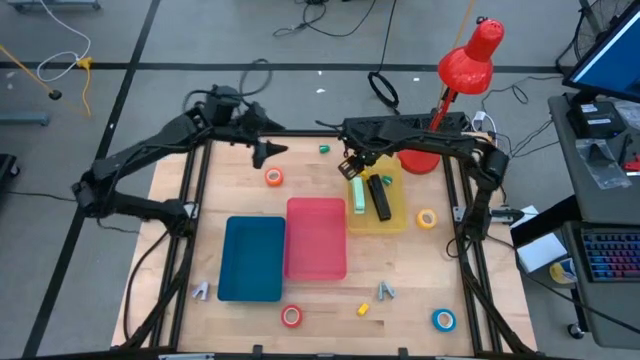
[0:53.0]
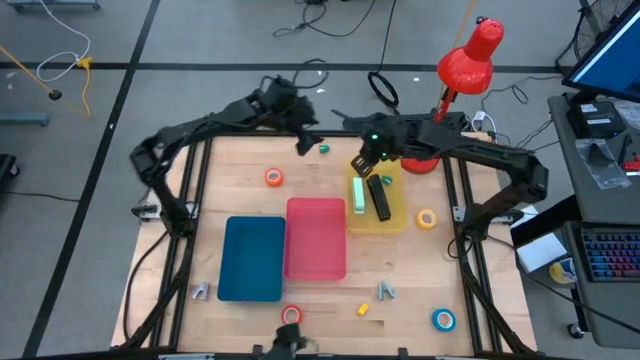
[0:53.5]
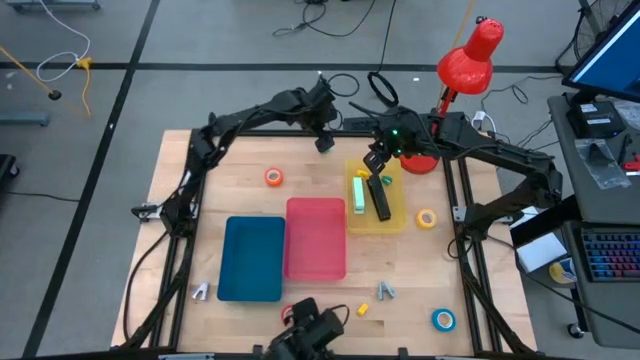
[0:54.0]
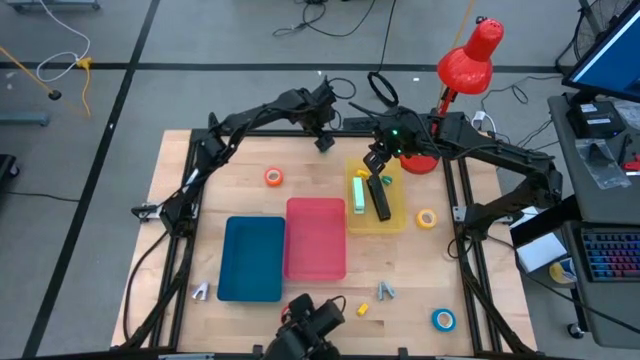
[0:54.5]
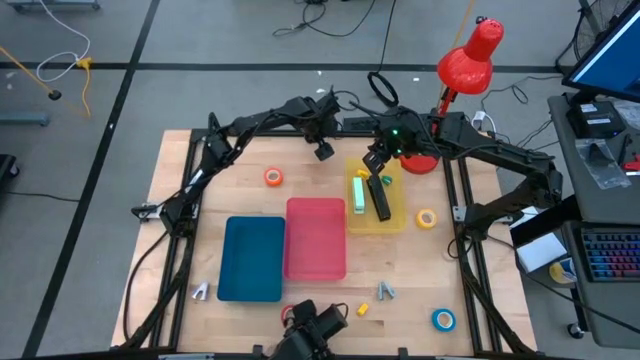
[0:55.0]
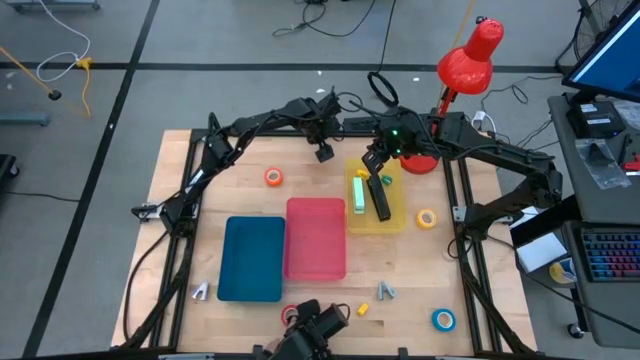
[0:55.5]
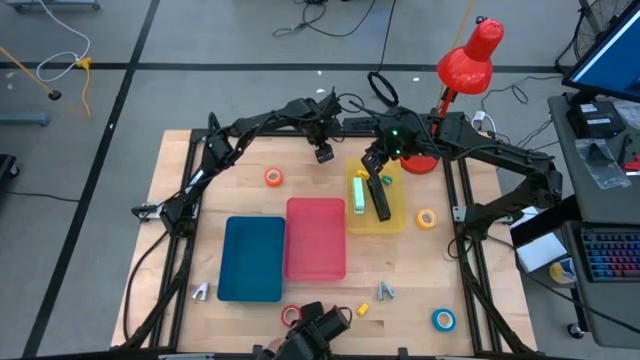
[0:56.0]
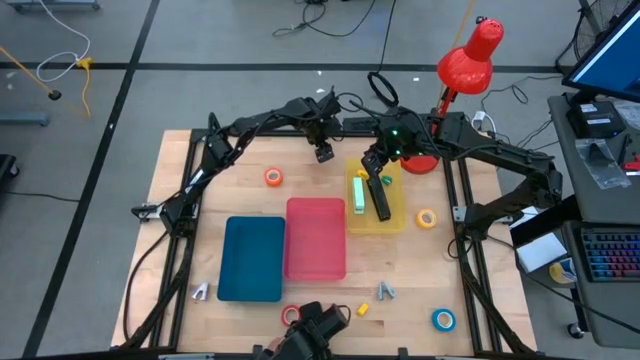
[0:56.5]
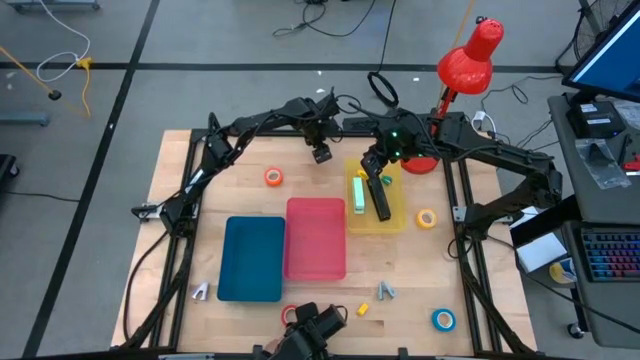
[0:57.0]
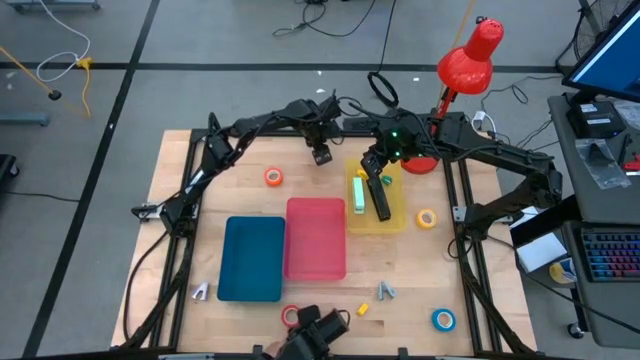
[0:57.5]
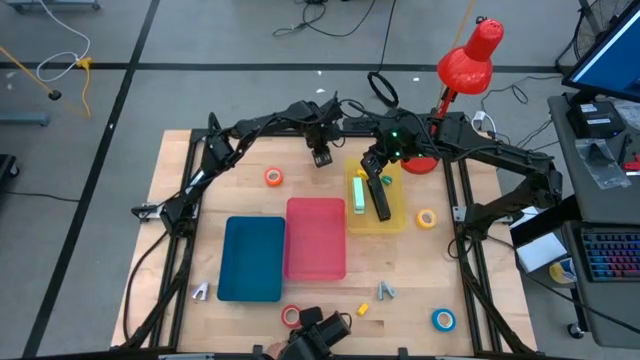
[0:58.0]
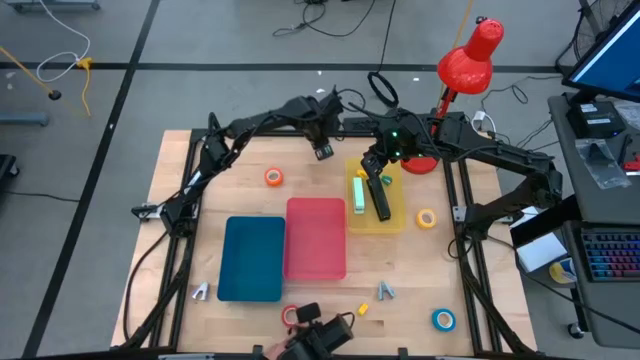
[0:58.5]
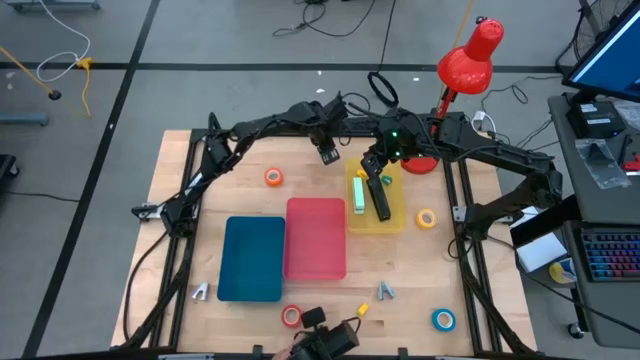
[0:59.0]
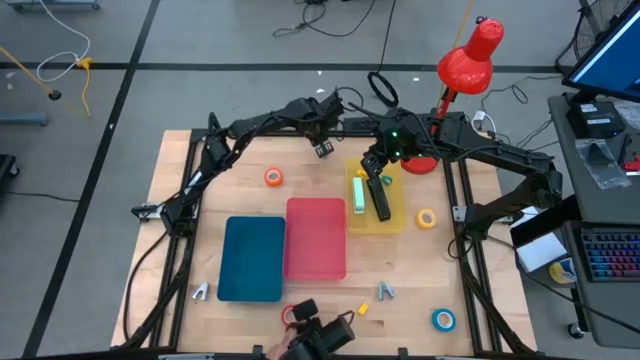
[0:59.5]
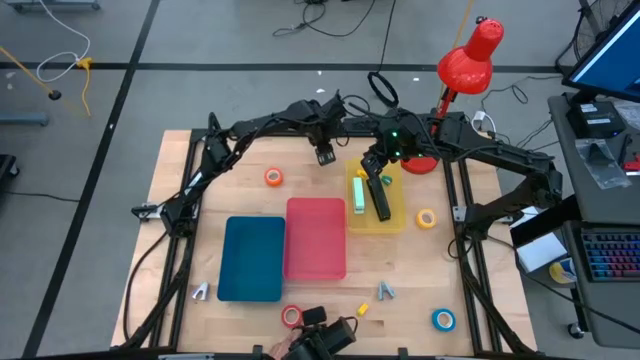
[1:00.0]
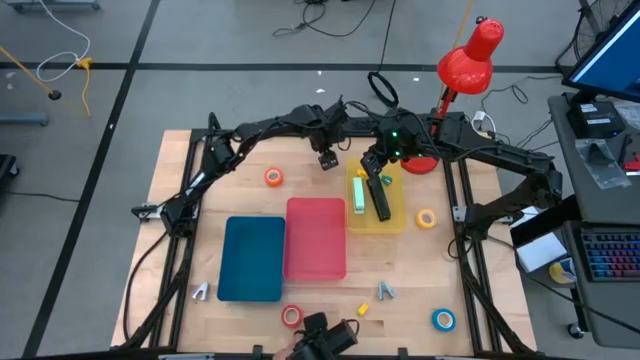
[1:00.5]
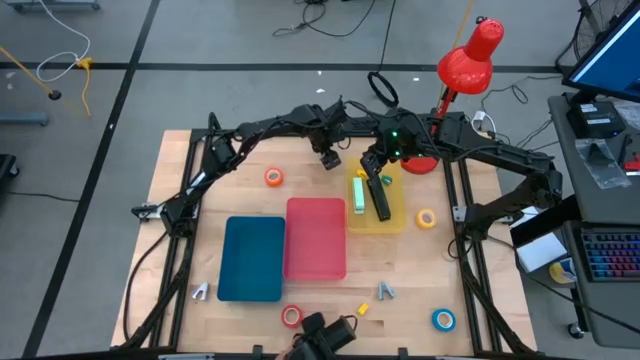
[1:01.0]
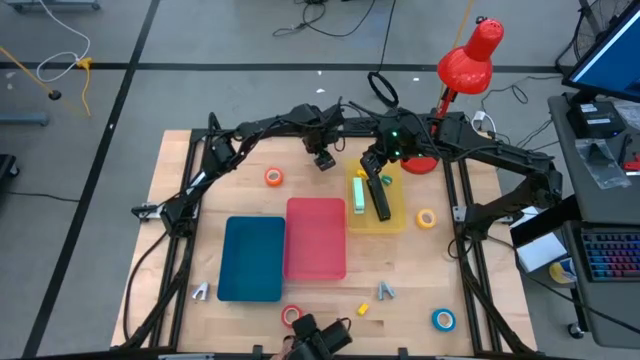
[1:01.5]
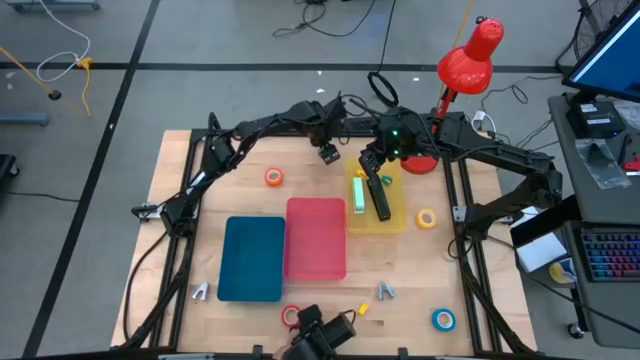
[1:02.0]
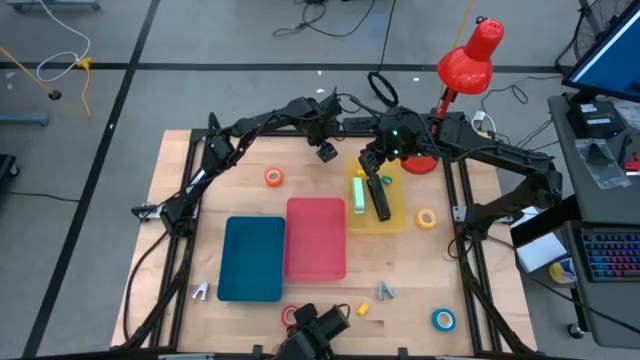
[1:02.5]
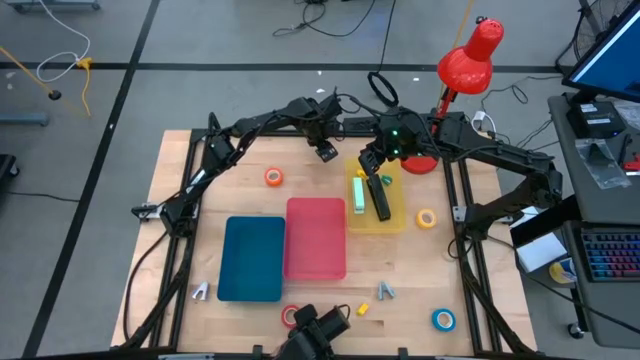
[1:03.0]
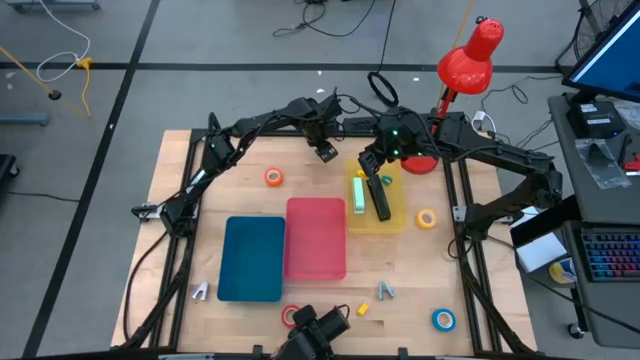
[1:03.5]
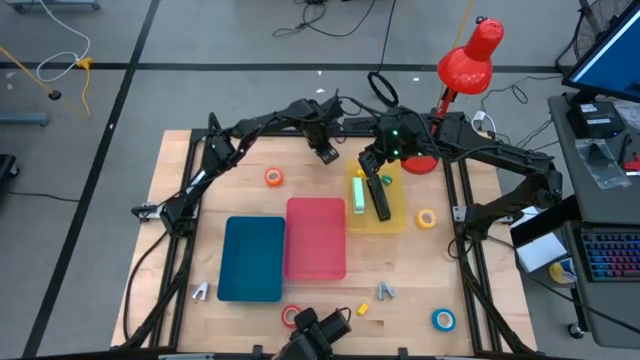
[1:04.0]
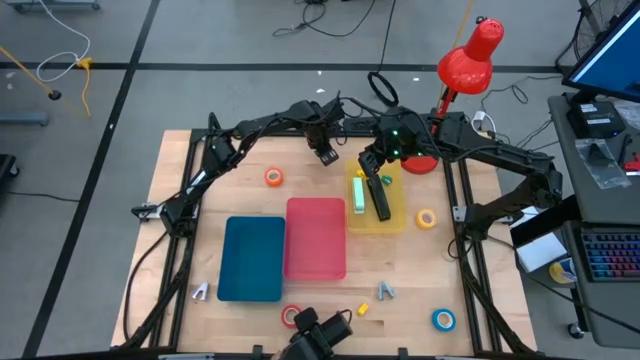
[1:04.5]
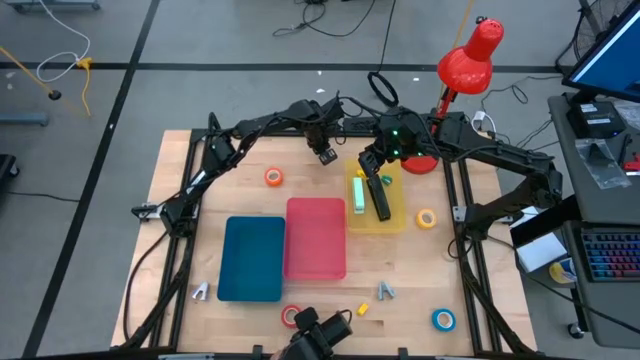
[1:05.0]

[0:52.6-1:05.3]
Task: Pick and place Stapler, Stapler remover, tape
Put the green stapler into the yellow bin

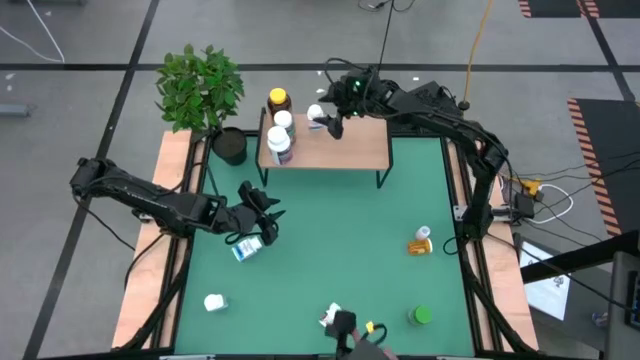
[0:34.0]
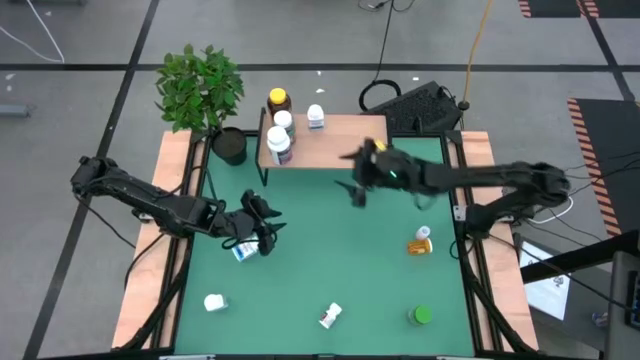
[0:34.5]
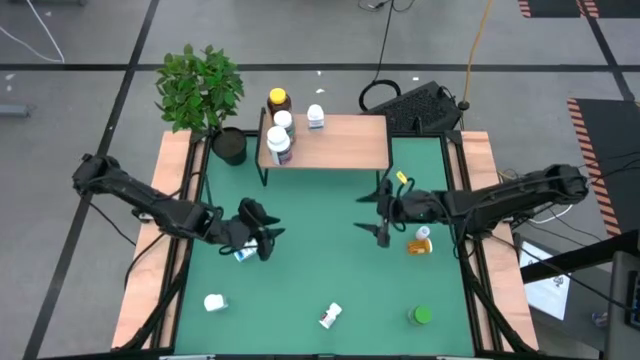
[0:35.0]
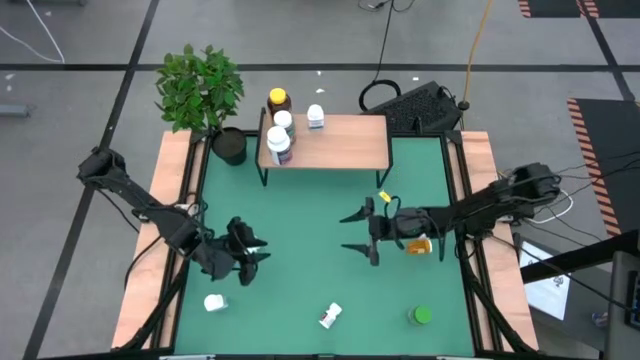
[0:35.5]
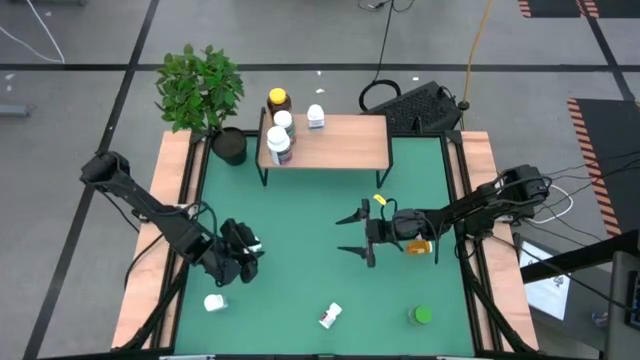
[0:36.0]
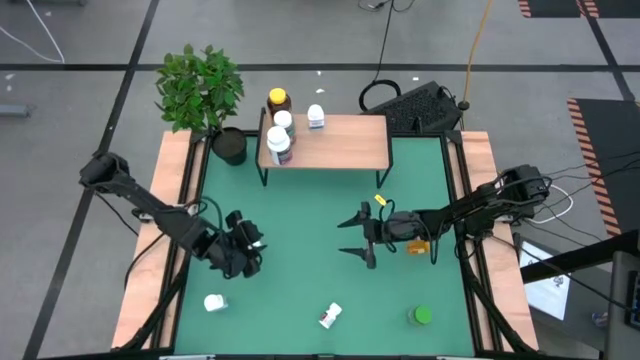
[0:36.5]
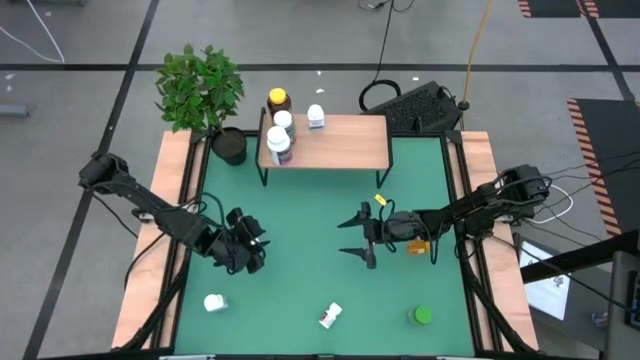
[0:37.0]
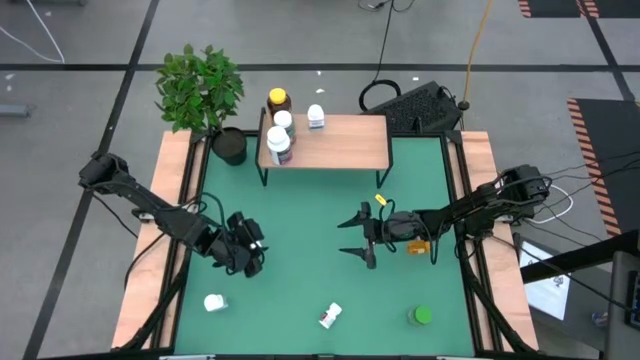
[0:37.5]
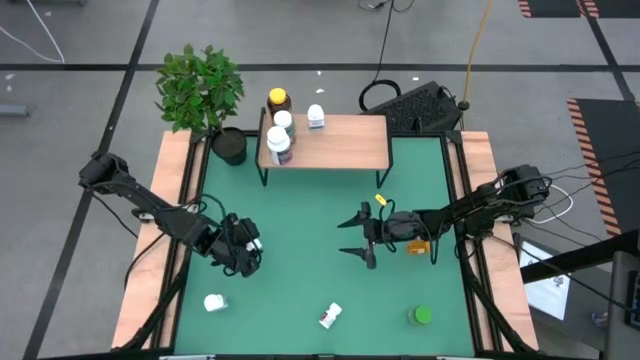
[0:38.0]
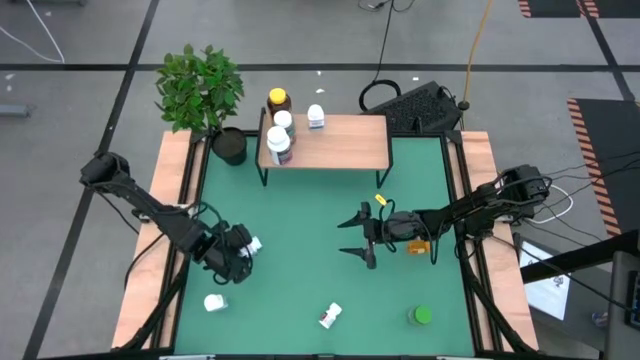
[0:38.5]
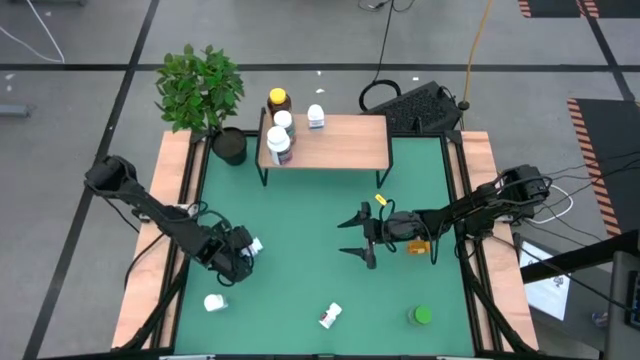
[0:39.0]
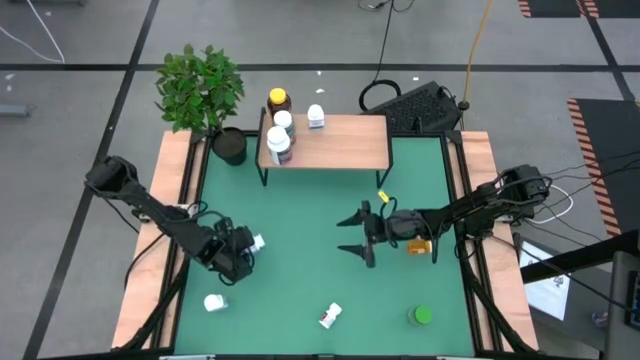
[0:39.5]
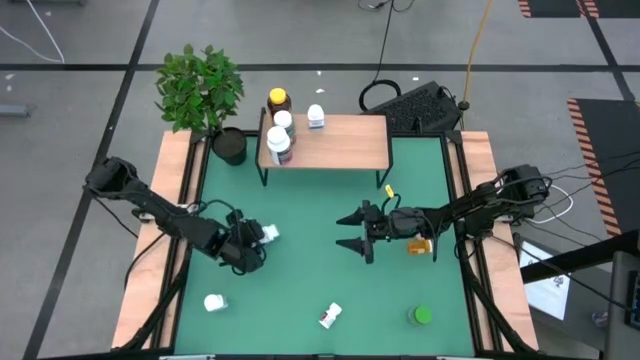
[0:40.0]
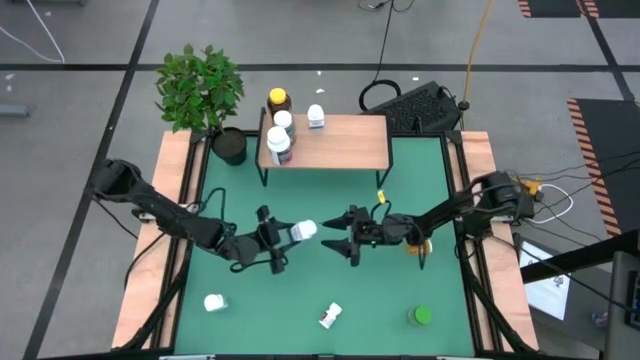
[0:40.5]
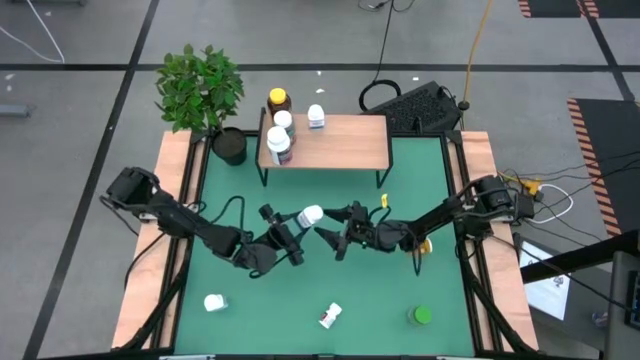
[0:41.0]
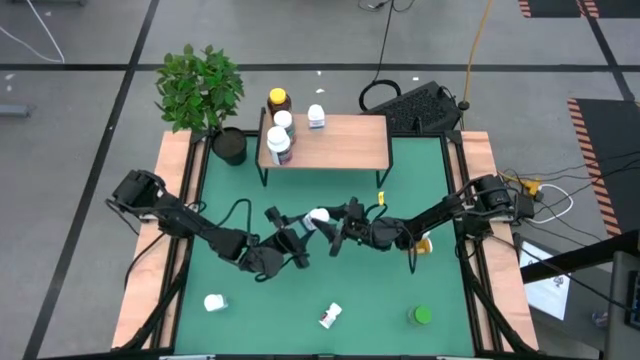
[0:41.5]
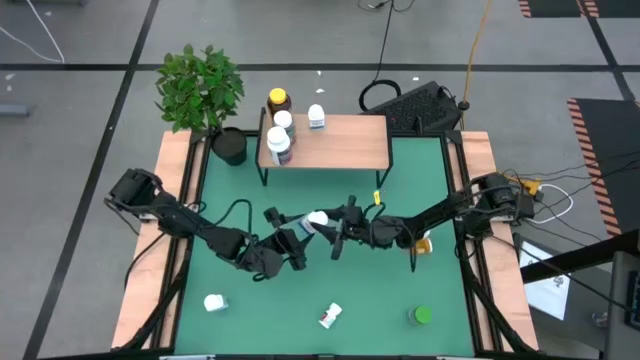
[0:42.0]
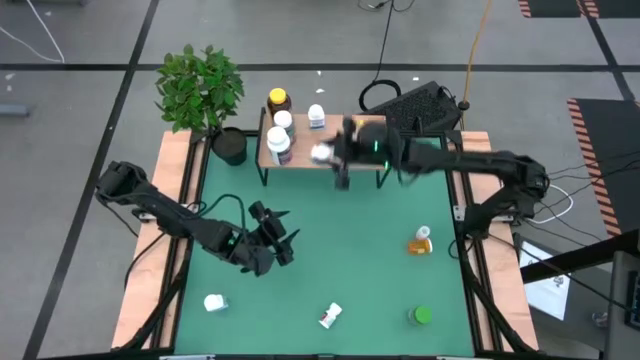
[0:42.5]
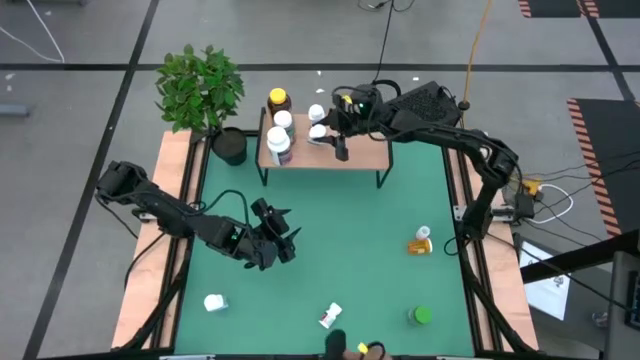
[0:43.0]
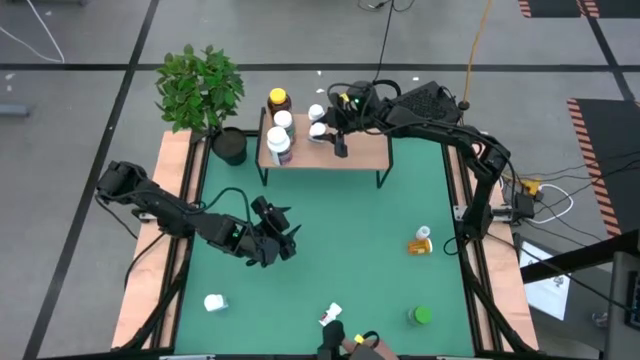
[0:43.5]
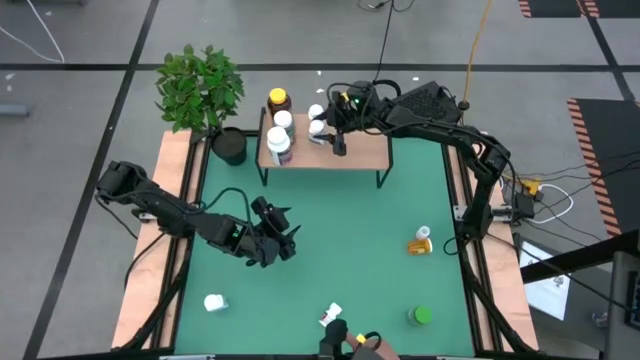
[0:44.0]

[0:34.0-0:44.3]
Task: Pick and place medicine bottles onto shelf by color
Put the top white and blue medicine bottle on the shelf
